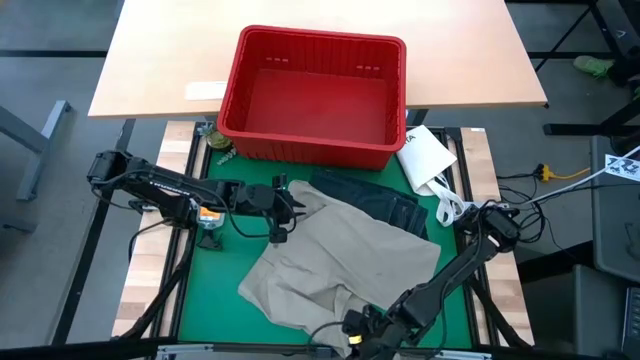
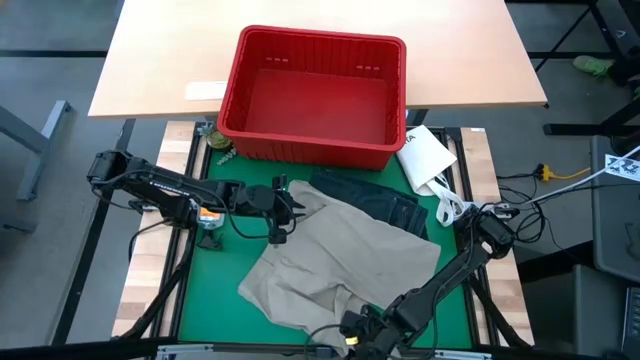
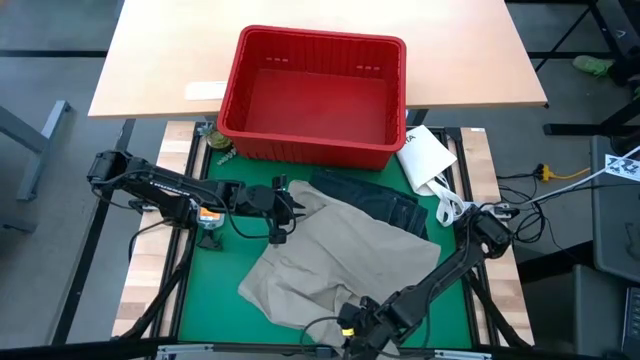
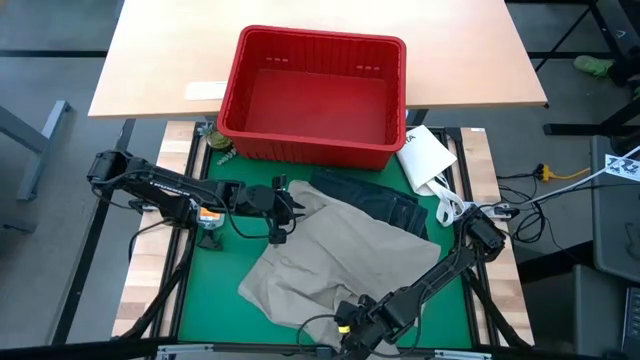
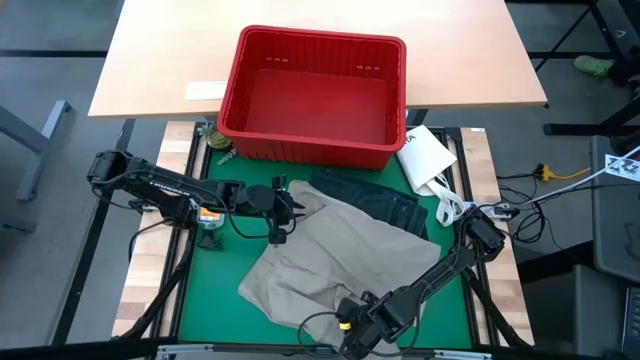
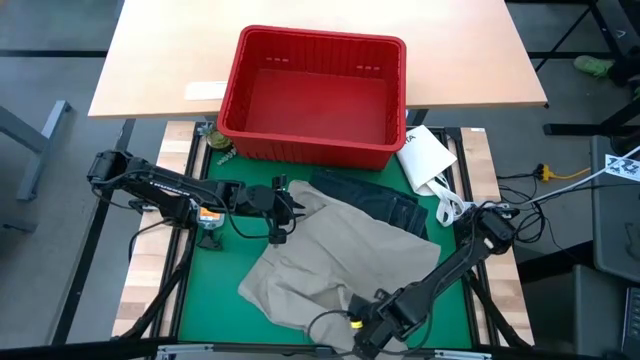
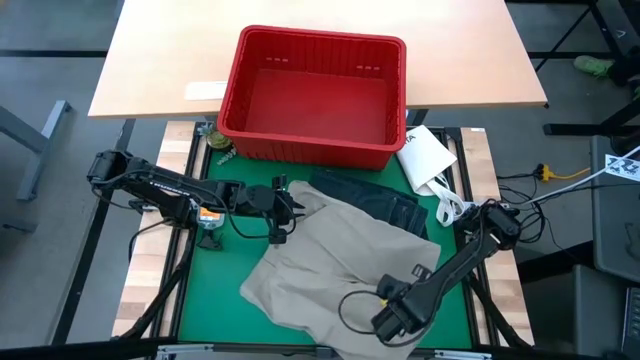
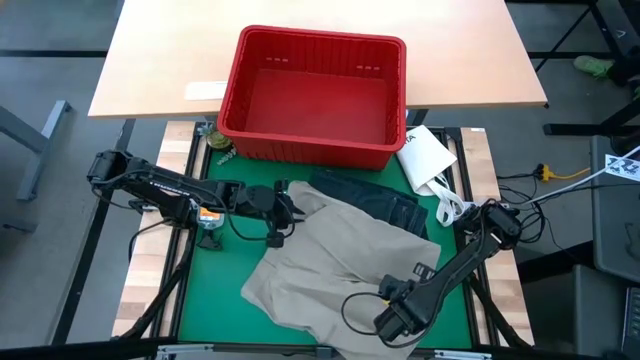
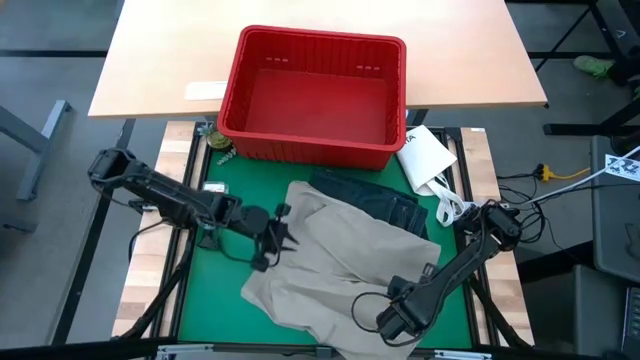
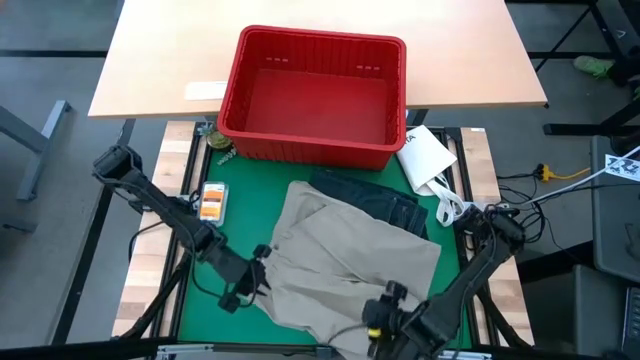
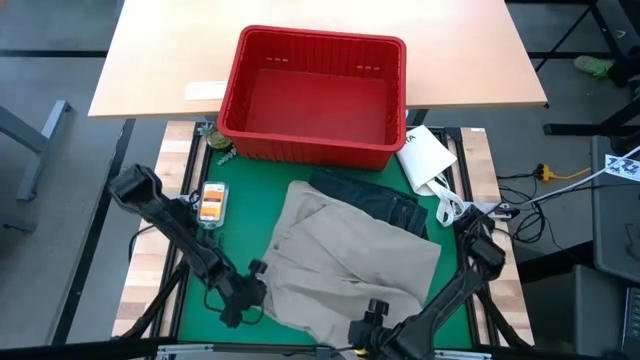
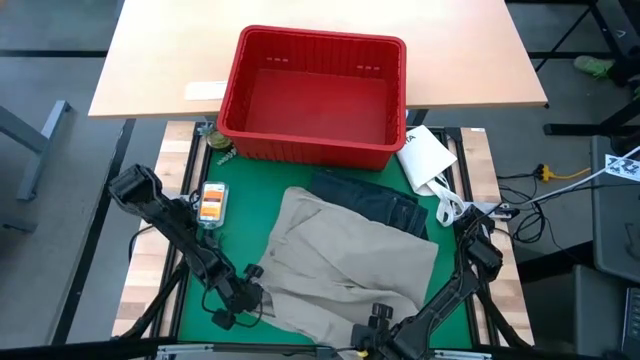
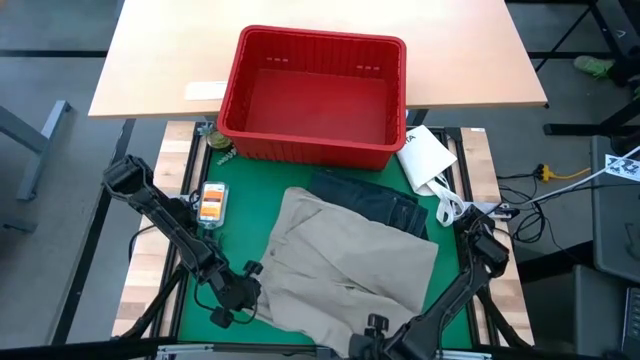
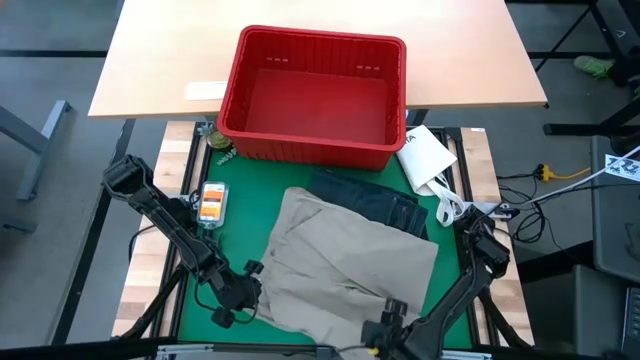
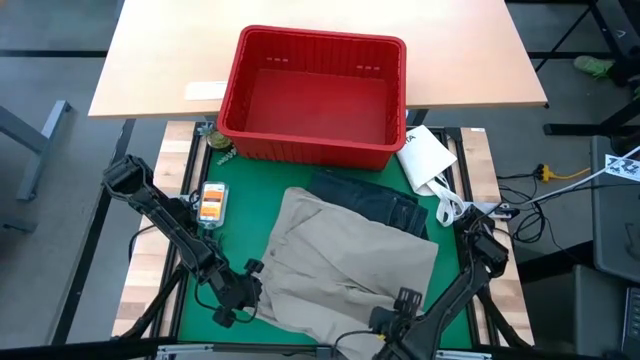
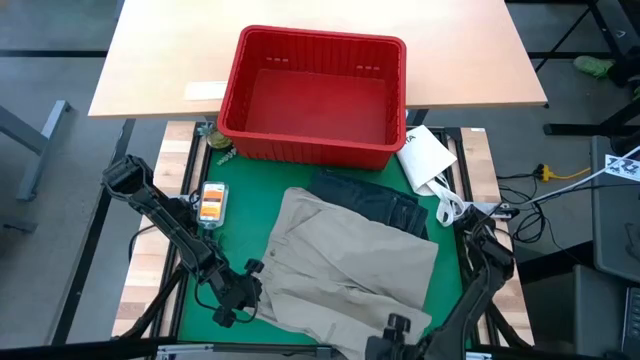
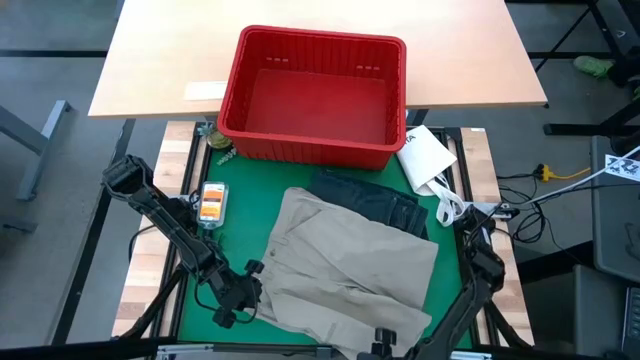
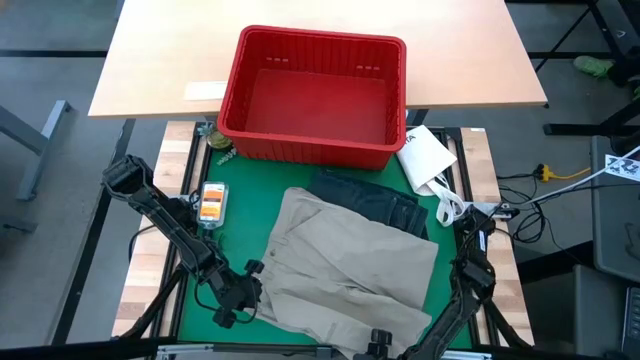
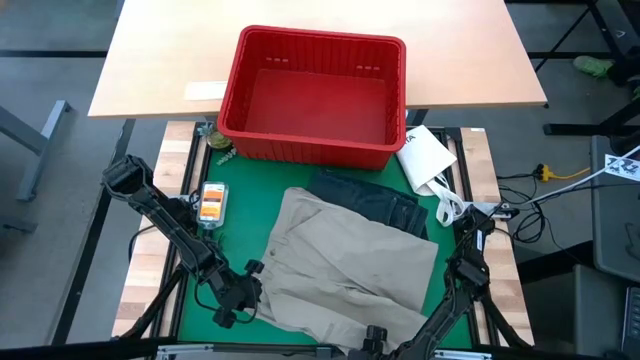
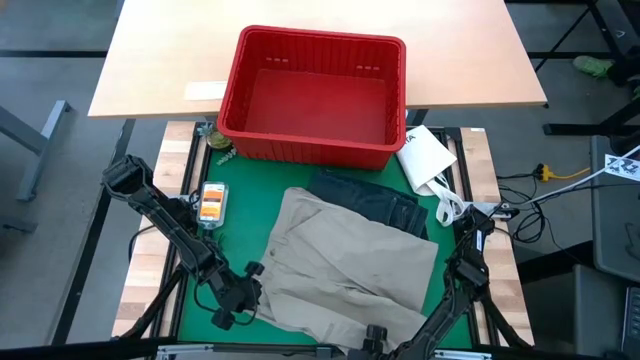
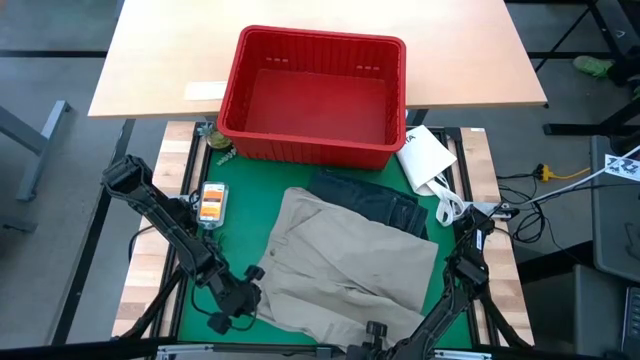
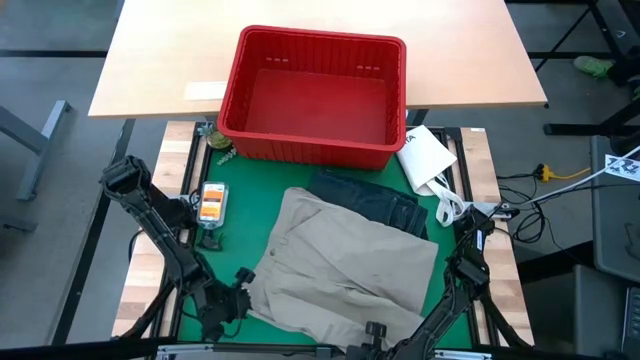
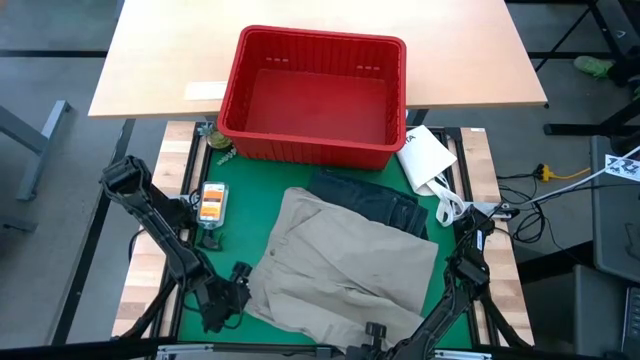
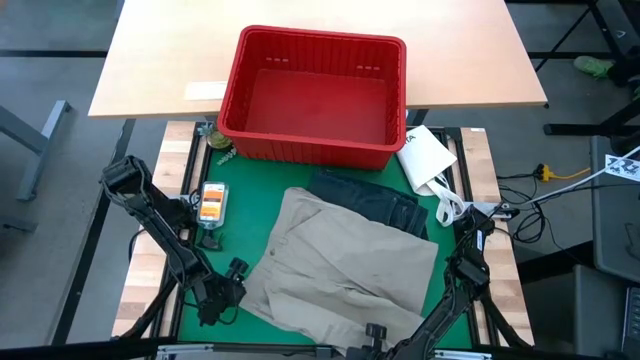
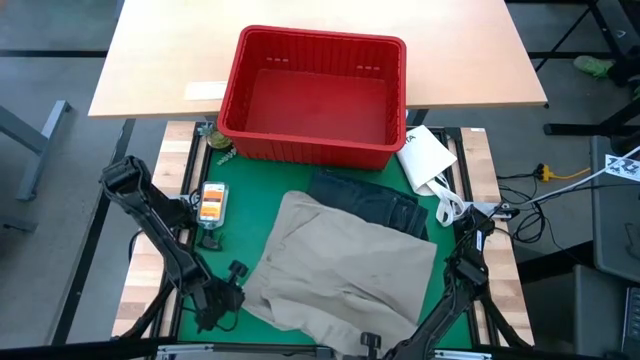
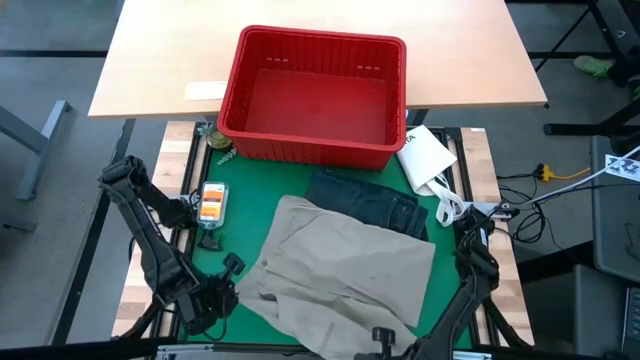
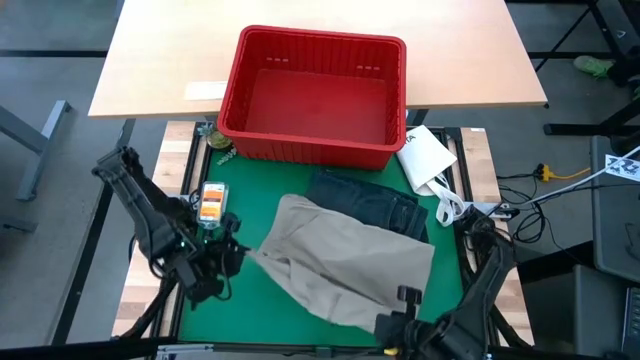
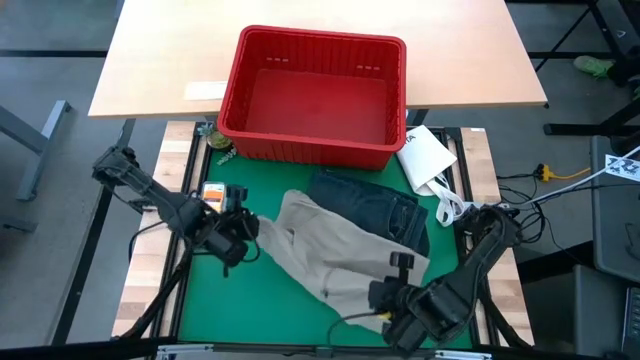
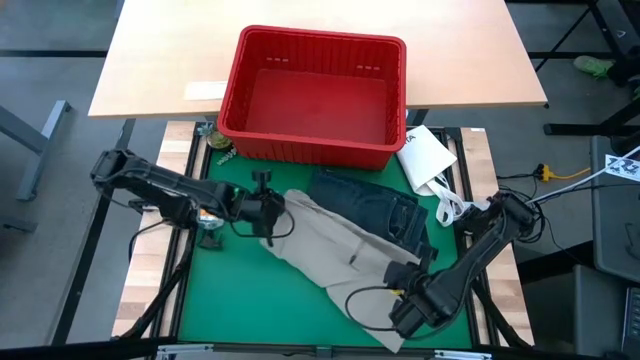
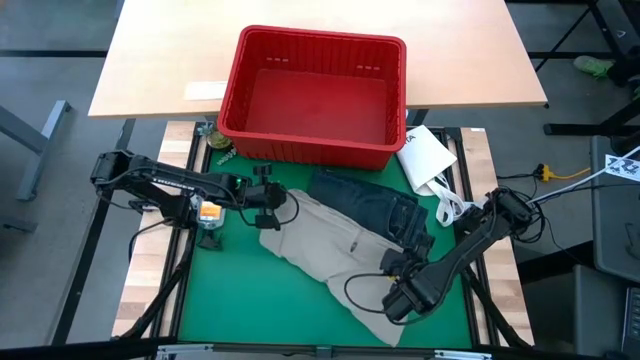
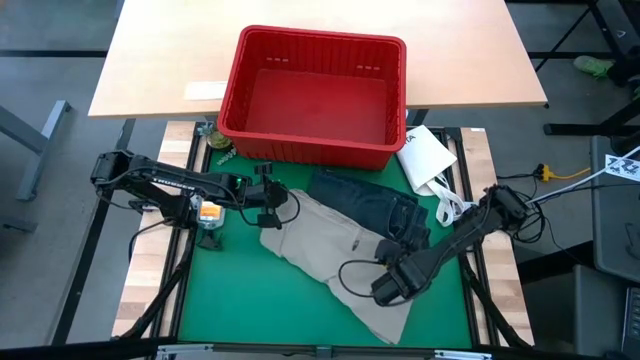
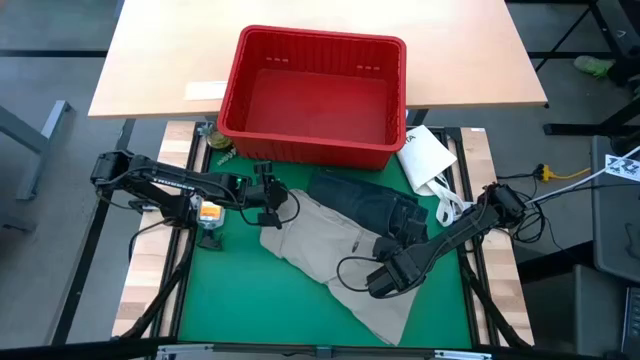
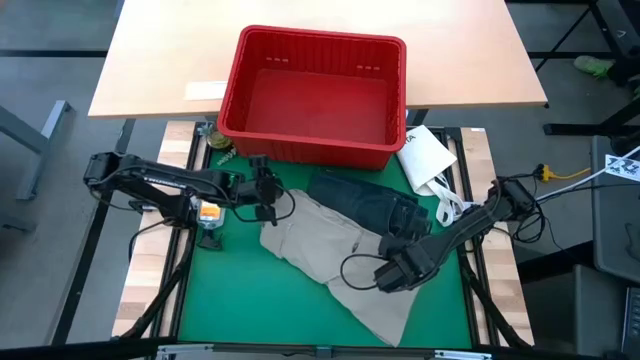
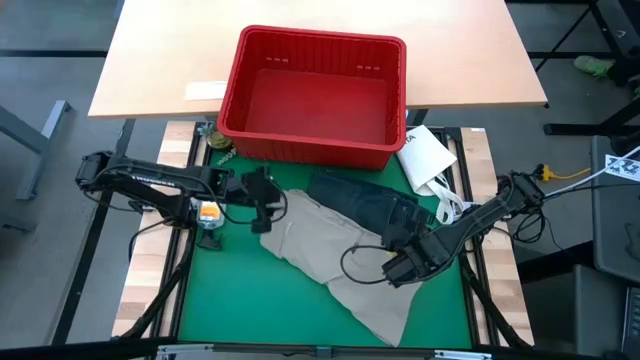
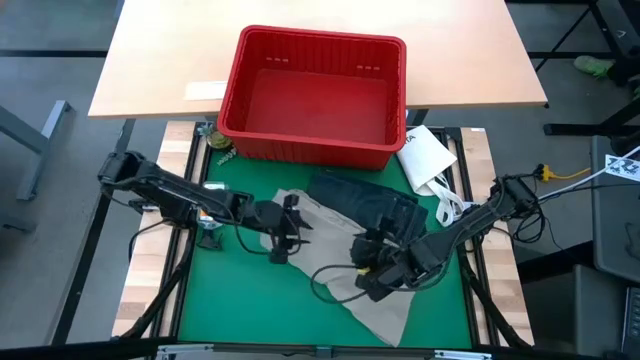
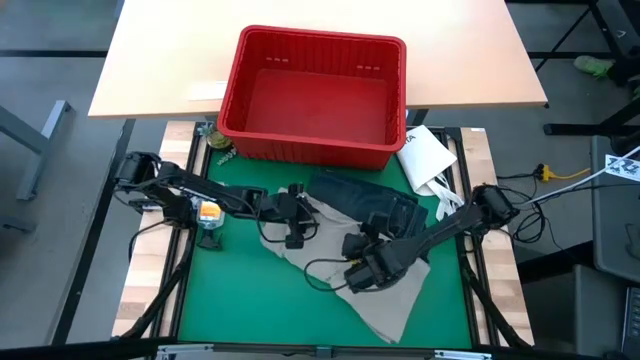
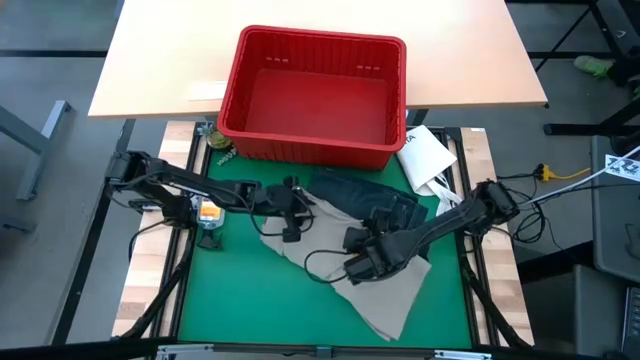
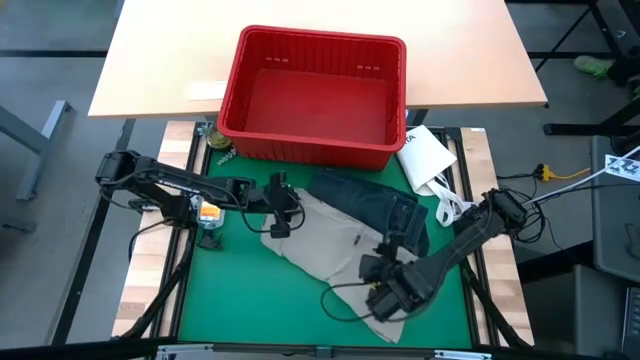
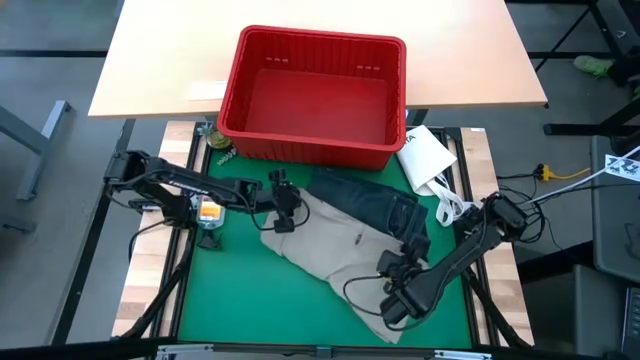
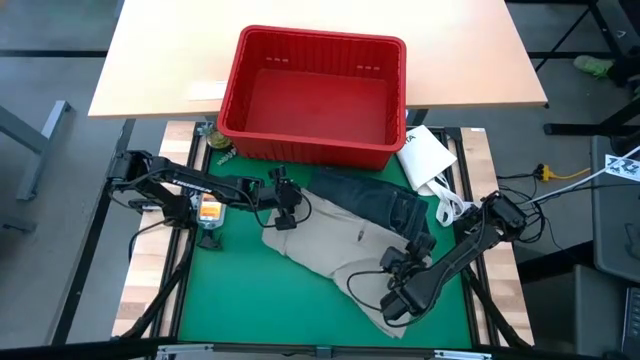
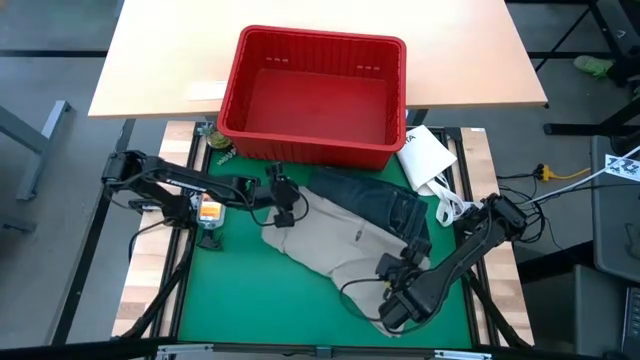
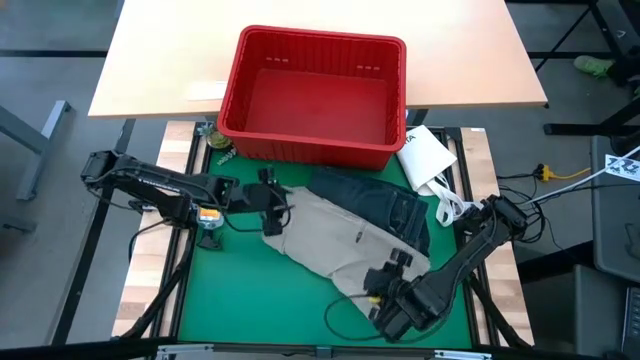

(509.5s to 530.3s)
Task: Fold Laundry from Bin
Fold the gray shorts
